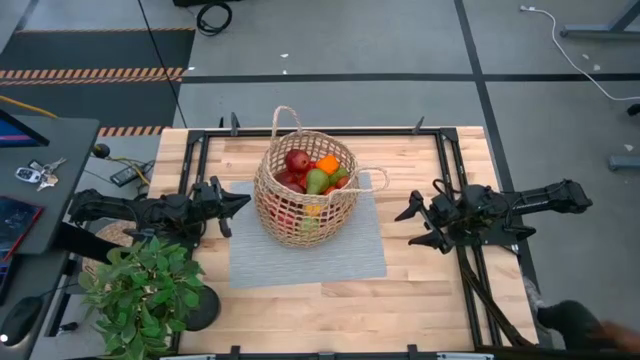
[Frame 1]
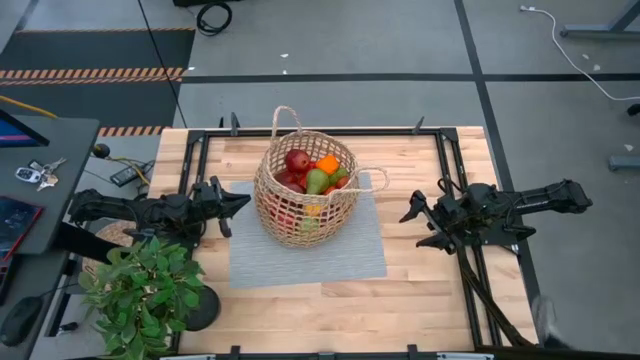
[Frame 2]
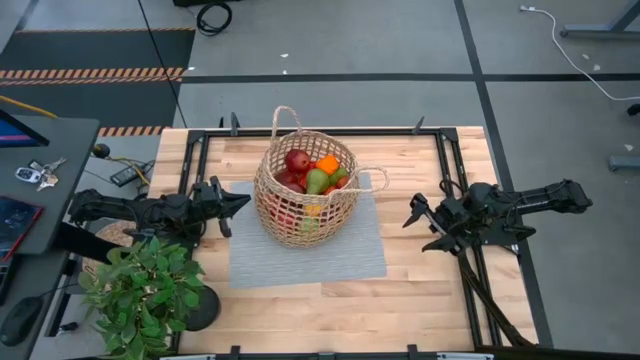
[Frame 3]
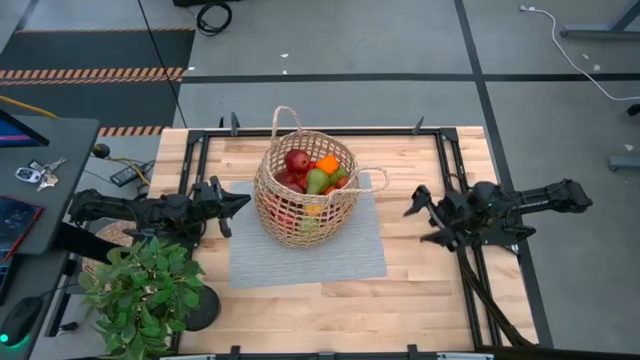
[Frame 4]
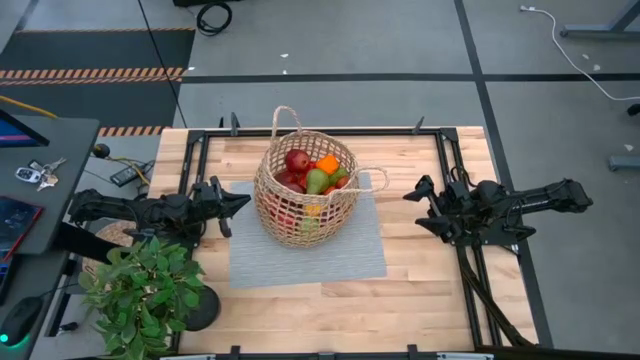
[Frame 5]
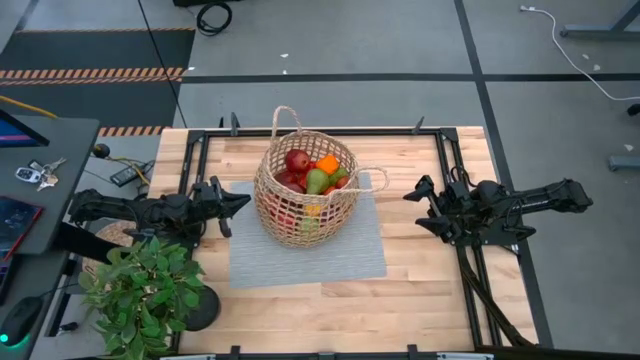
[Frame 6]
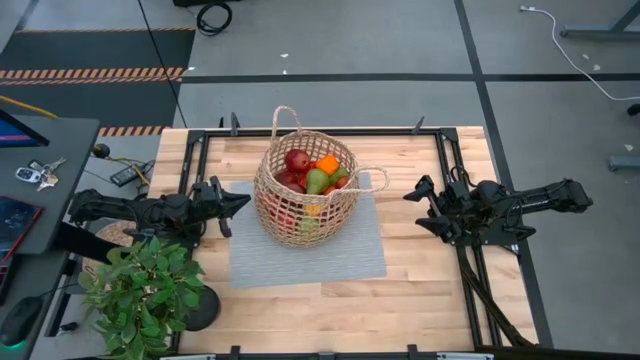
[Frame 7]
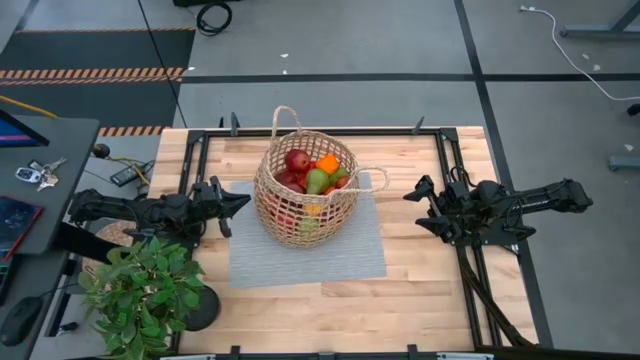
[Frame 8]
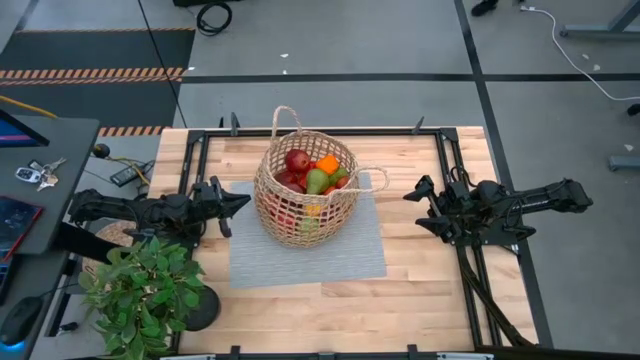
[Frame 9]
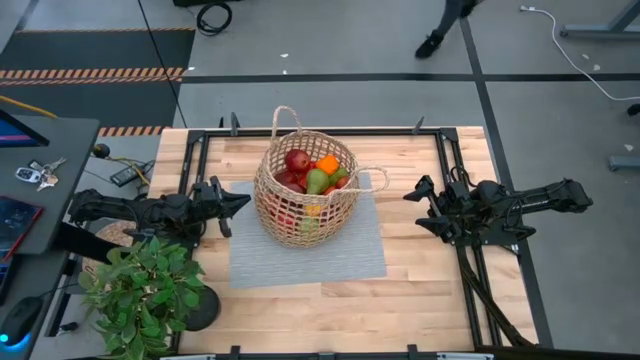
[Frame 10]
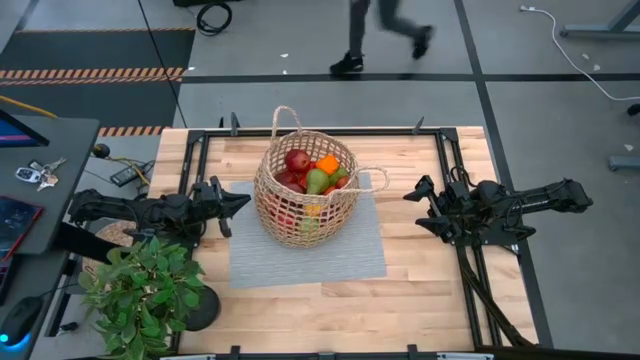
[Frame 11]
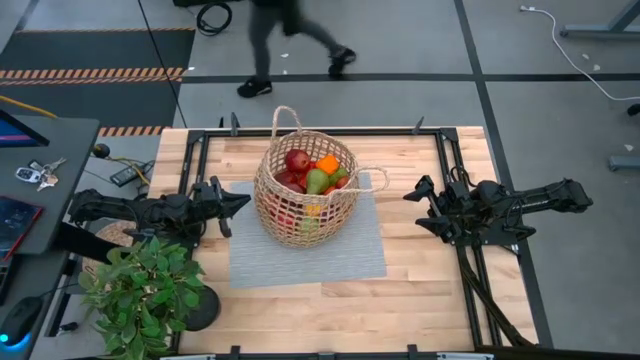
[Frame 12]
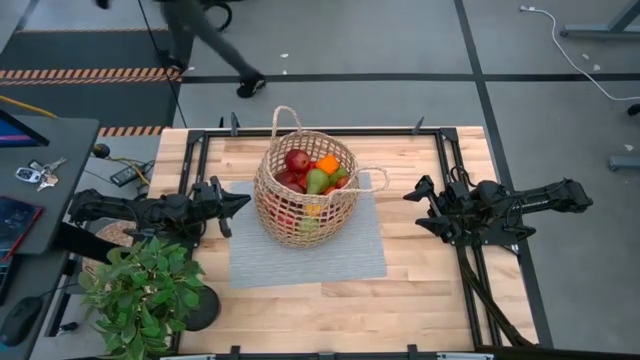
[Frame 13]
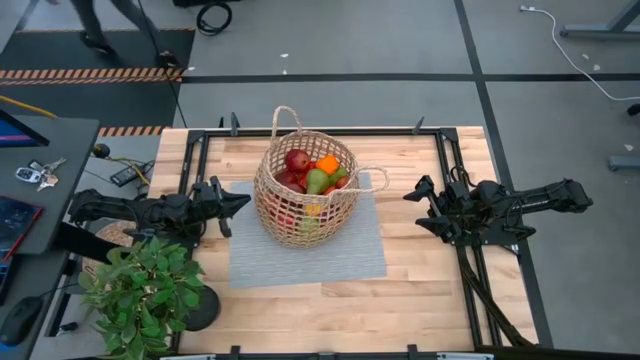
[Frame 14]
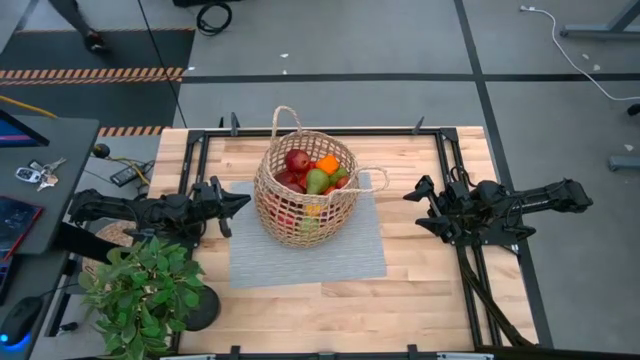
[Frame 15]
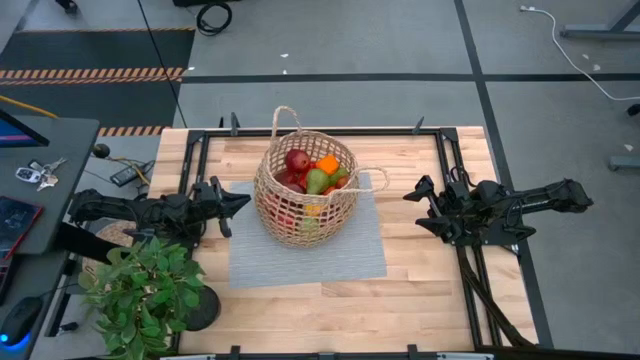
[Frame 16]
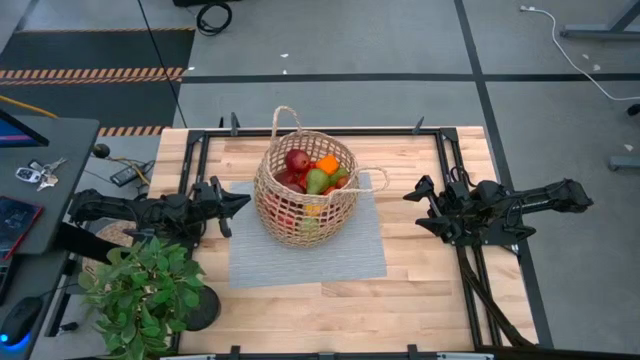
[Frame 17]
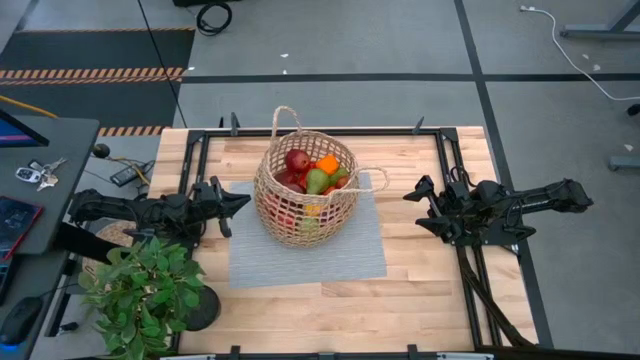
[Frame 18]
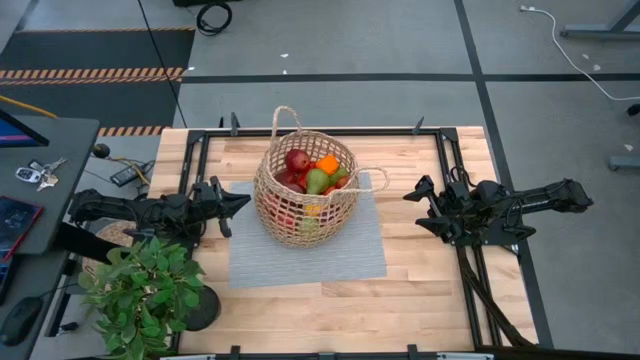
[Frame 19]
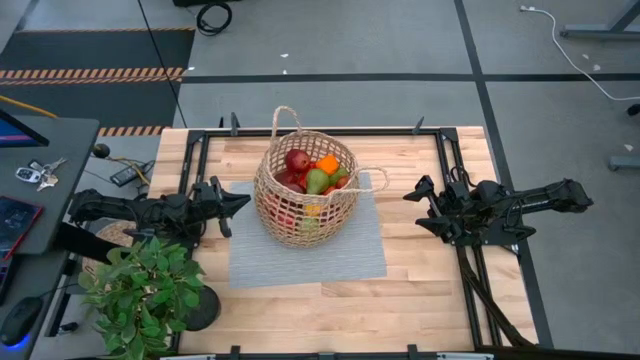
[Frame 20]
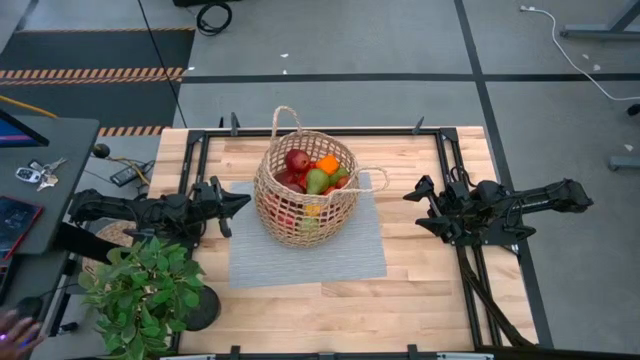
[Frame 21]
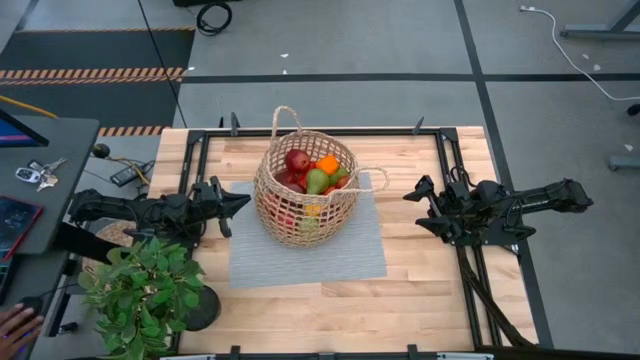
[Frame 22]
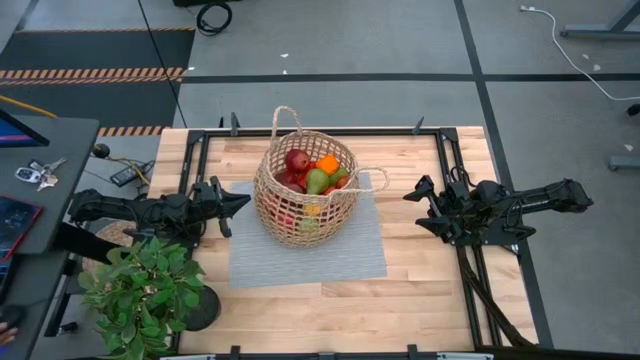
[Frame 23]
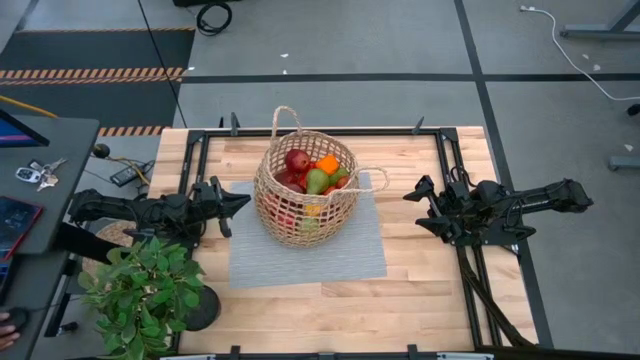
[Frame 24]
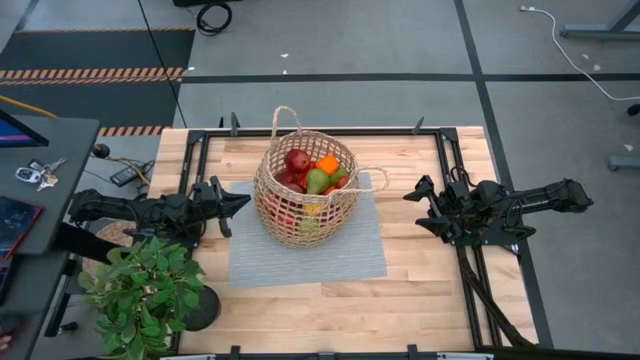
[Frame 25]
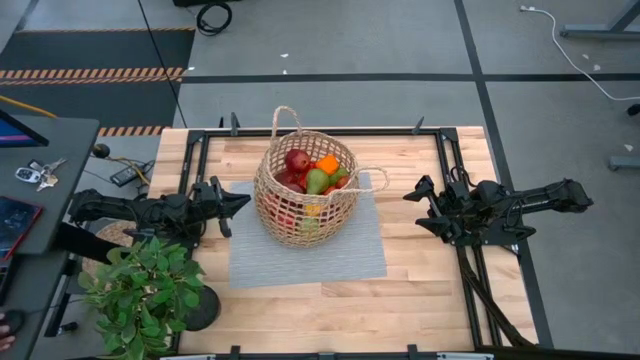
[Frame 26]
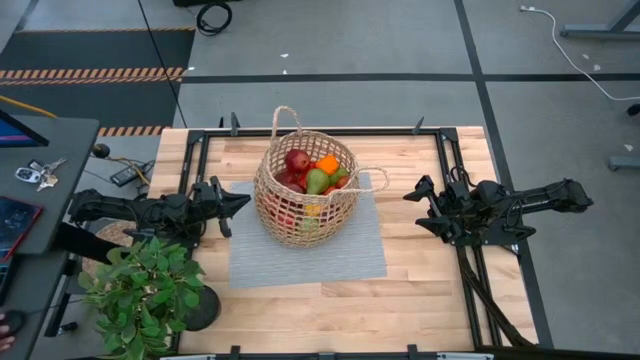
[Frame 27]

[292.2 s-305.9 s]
Task: Build produce basket
Return to Home Position

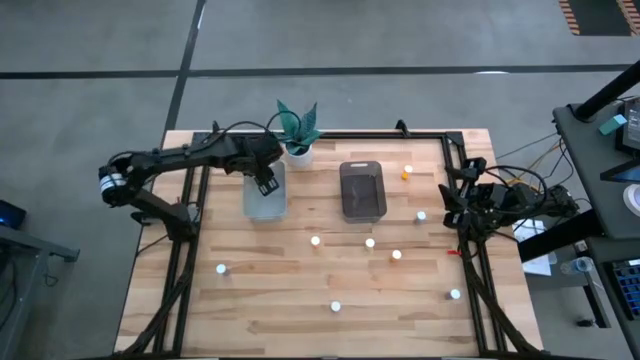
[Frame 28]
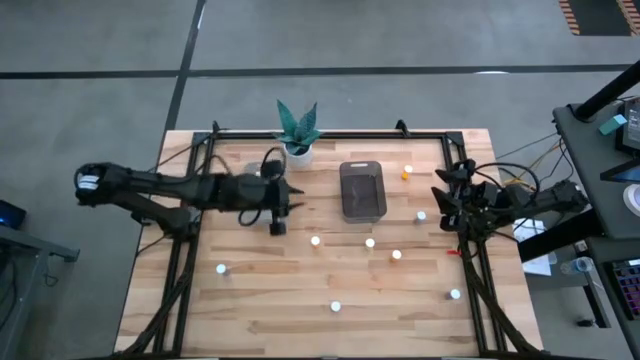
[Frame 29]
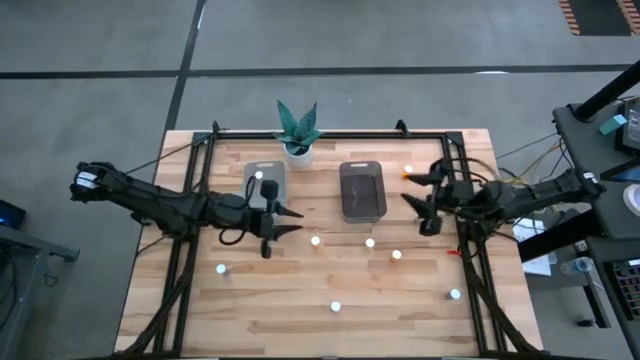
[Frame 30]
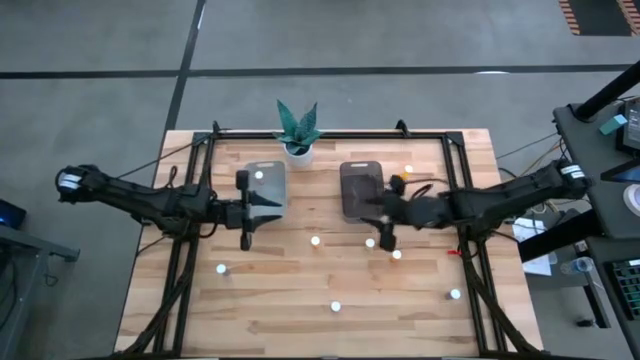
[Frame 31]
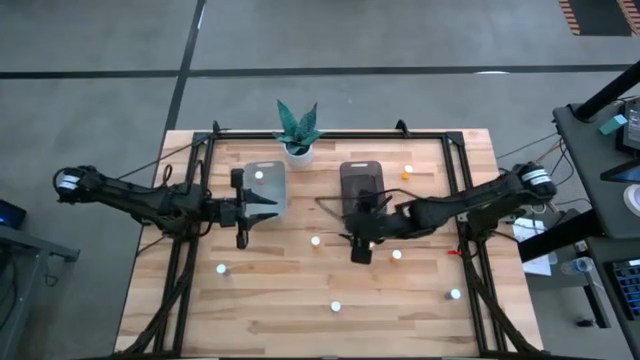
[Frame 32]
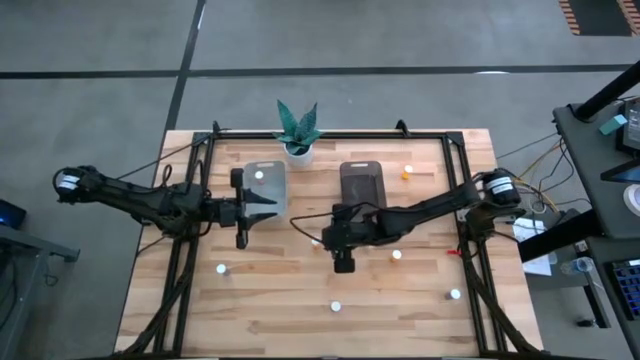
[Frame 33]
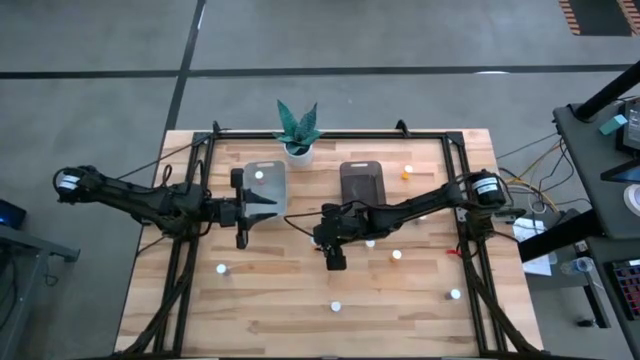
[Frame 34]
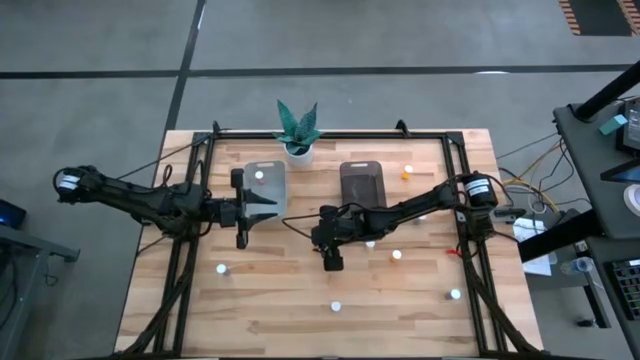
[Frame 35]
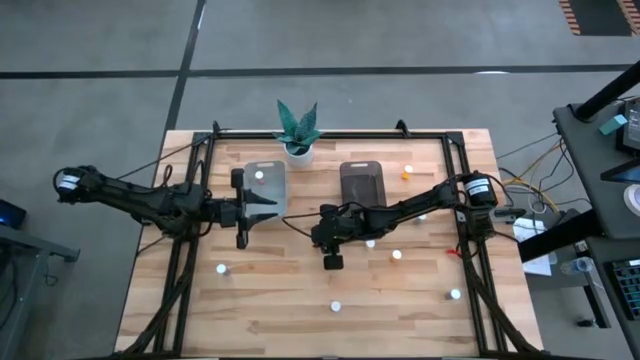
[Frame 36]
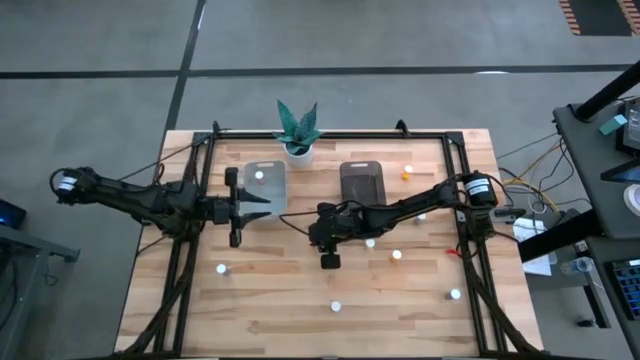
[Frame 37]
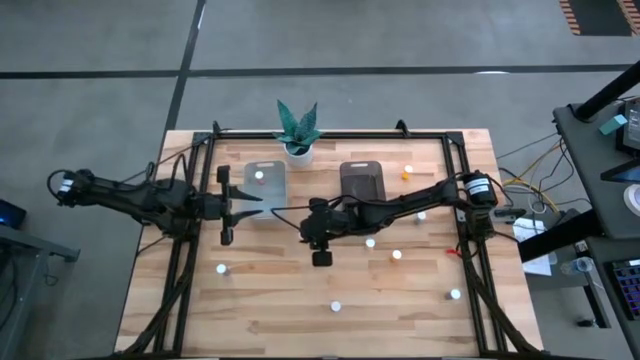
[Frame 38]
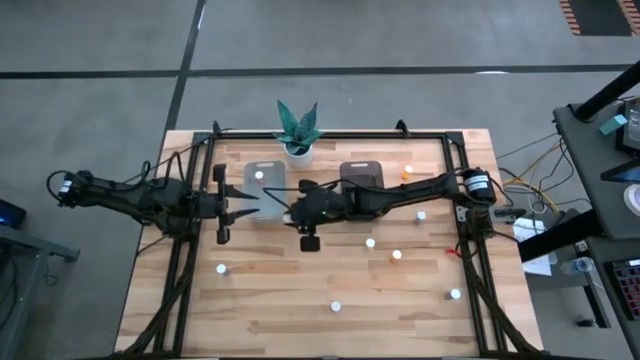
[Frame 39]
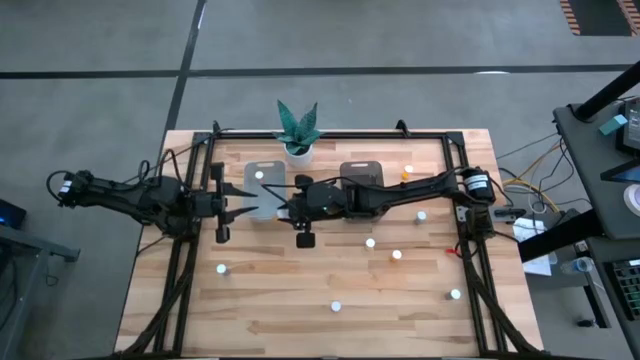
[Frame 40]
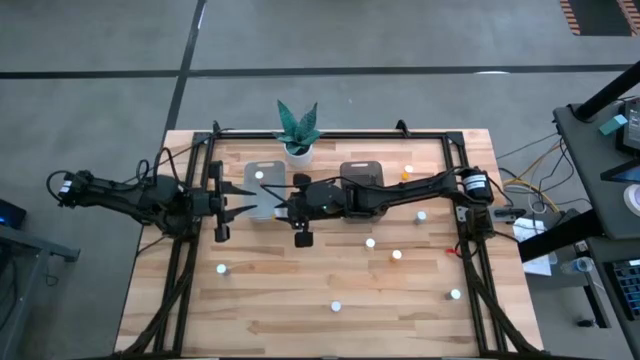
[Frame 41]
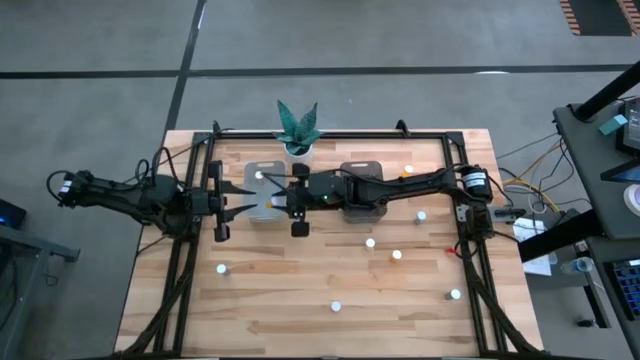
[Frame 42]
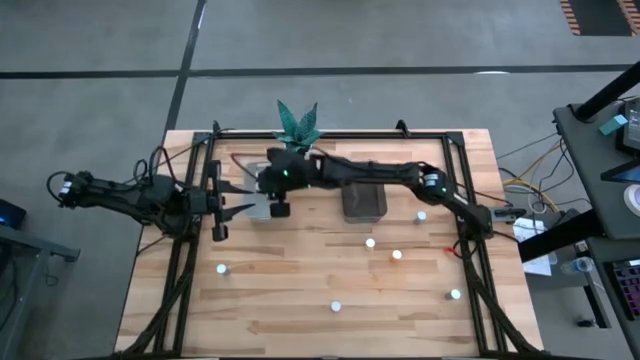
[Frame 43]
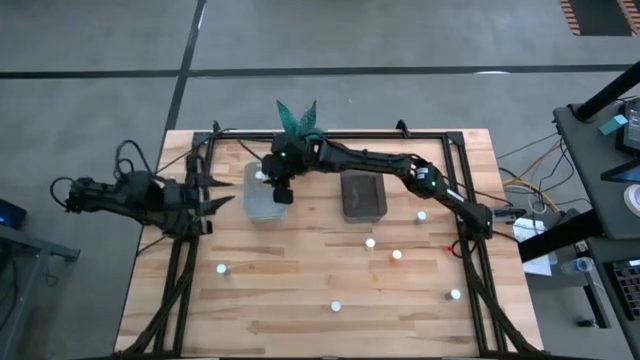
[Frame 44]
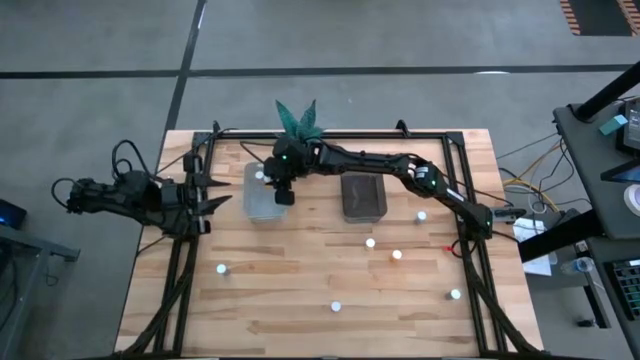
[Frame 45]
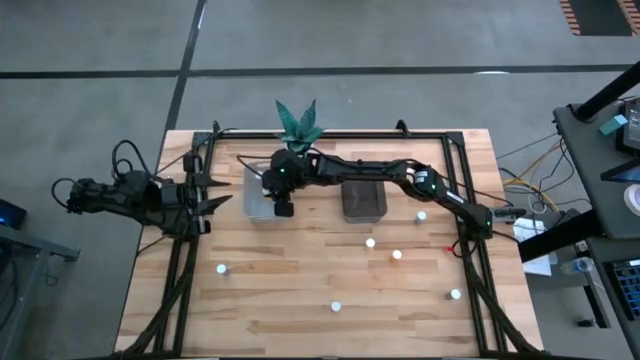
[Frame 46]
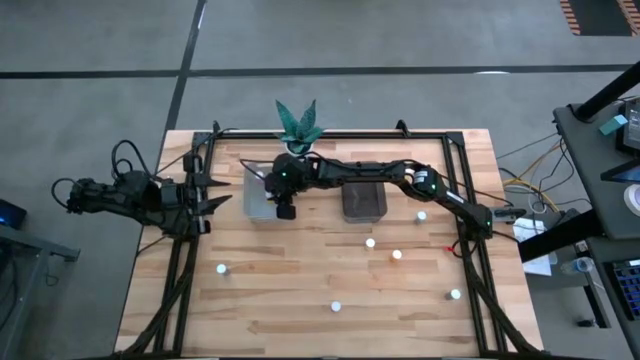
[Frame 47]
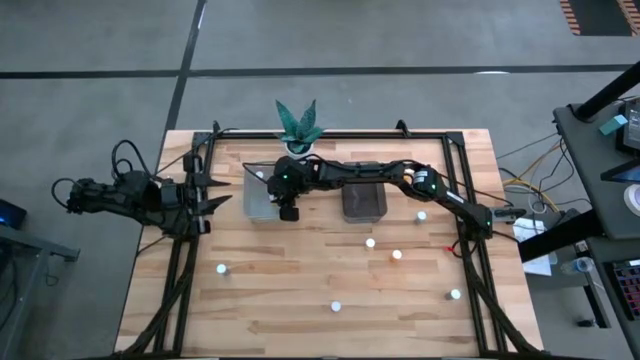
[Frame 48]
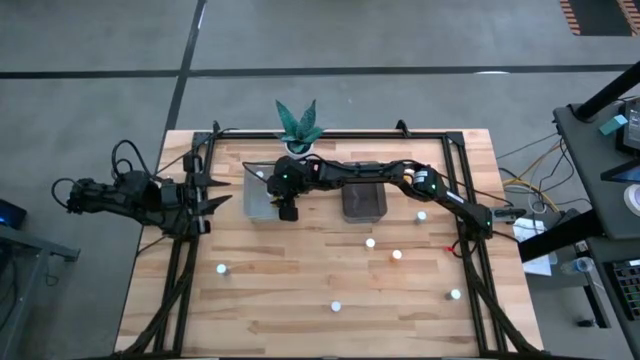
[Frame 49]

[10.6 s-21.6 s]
Task: Pick and place medicine bottles into bin by pill shape (circle, oval)
Put the bottom left orange tablet bottle into the gray bin
